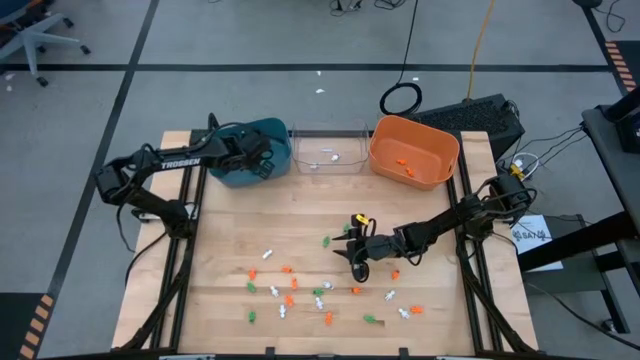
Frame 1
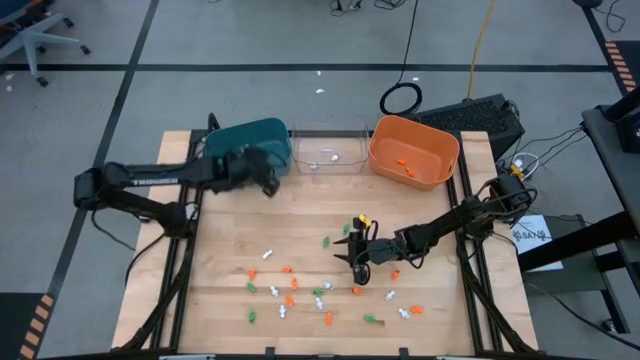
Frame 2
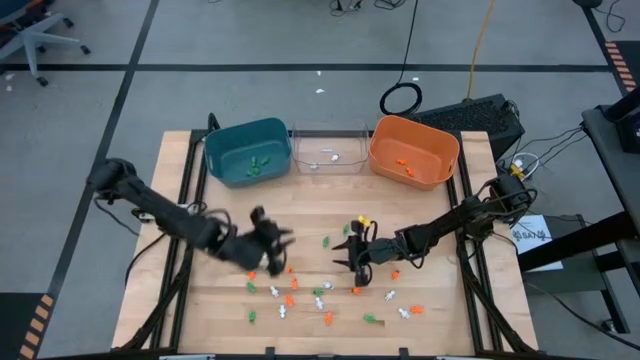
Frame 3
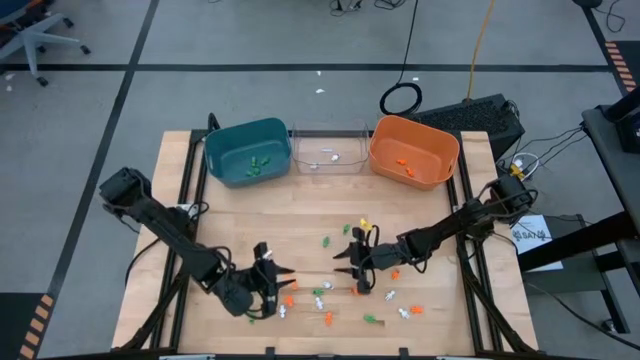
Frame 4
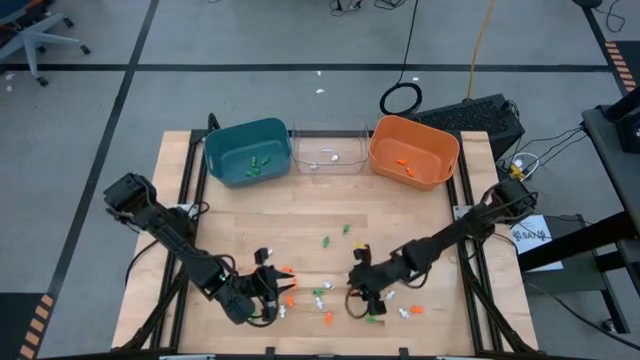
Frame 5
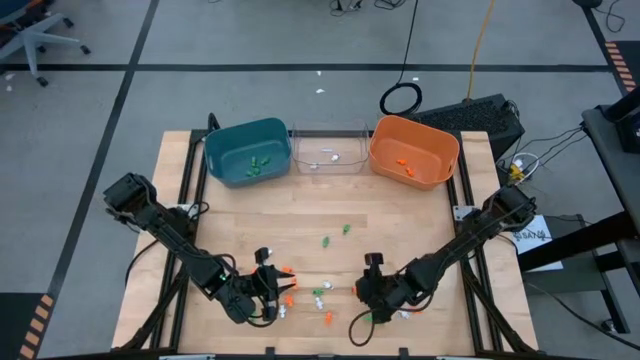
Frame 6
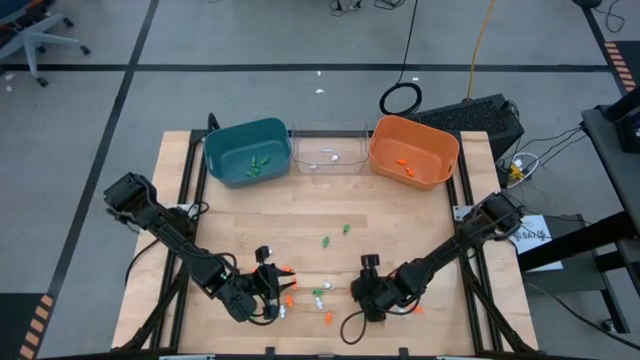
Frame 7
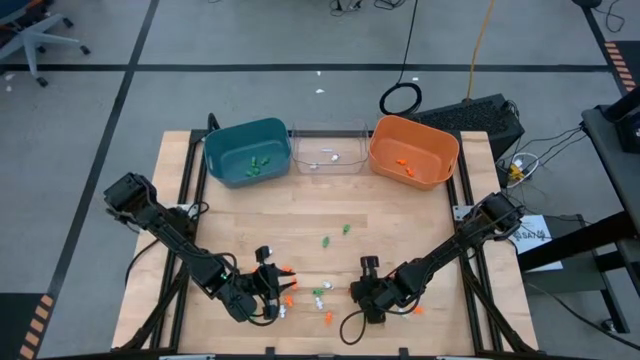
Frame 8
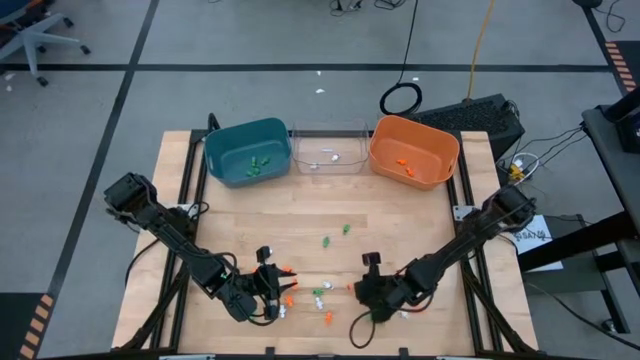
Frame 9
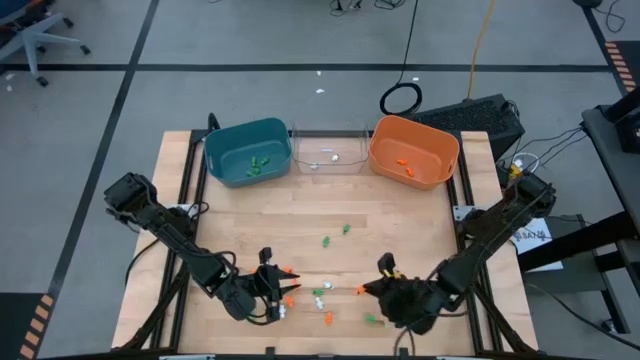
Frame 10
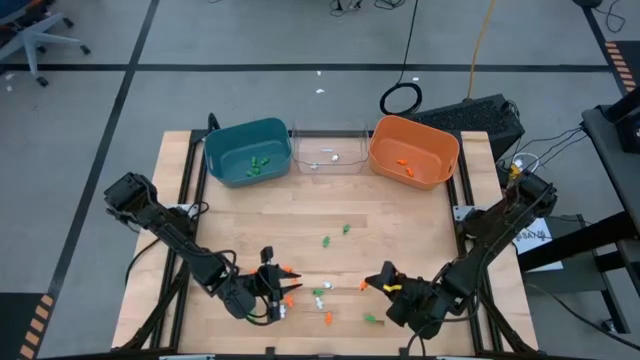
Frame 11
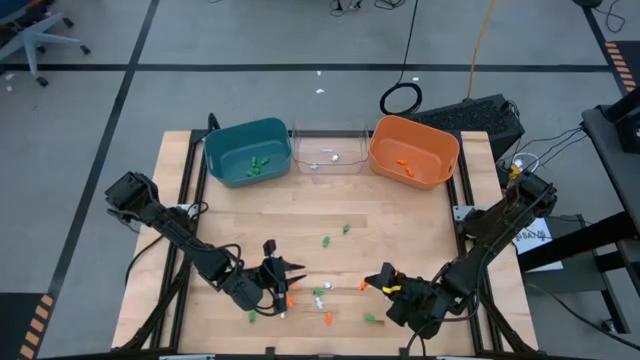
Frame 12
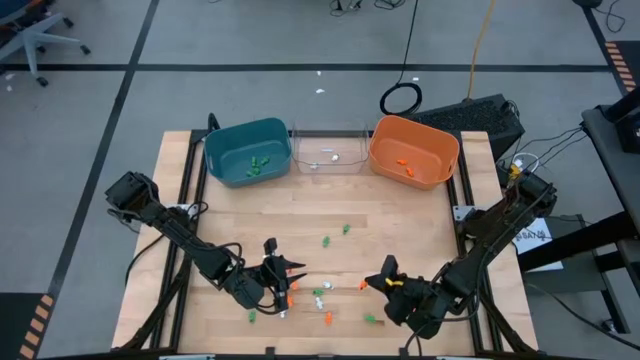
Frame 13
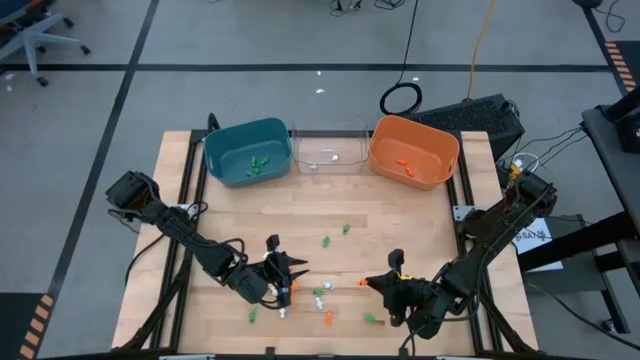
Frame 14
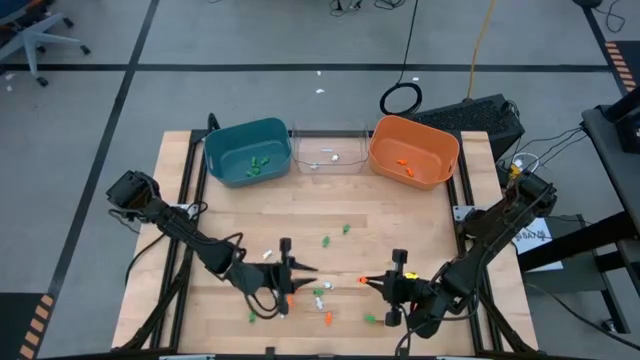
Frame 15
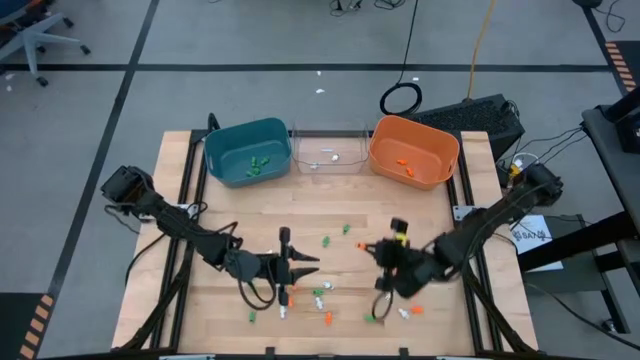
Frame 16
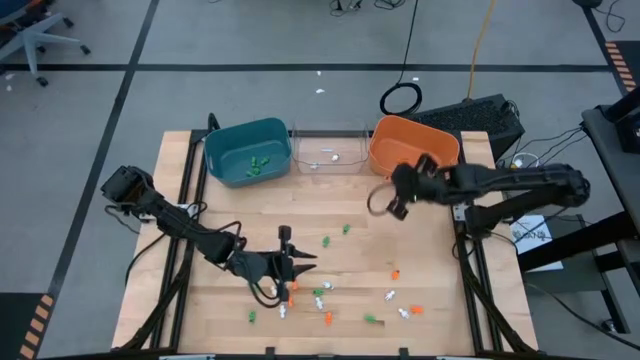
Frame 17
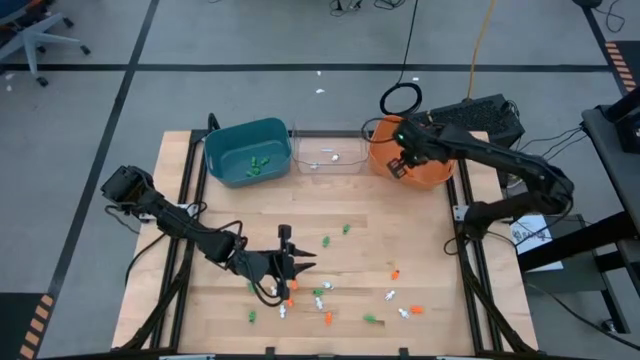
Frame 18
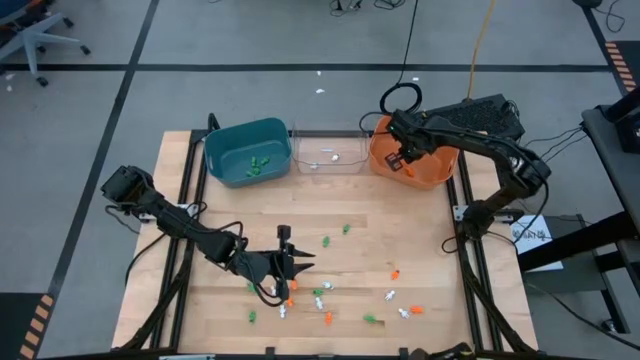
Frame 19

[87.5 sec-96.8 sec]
Task: Sort Halloween decoration
Put the orange skeleton toy into the orange bin

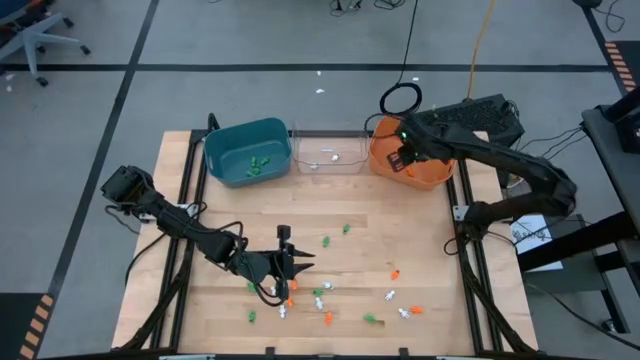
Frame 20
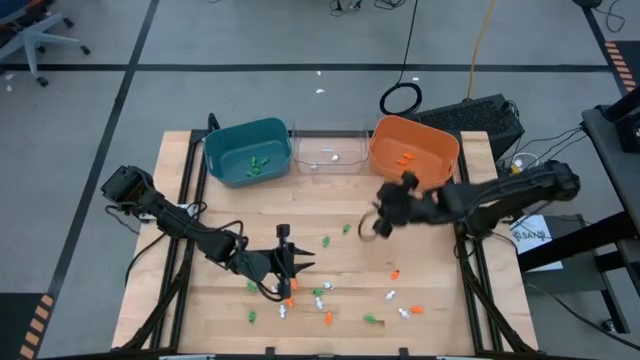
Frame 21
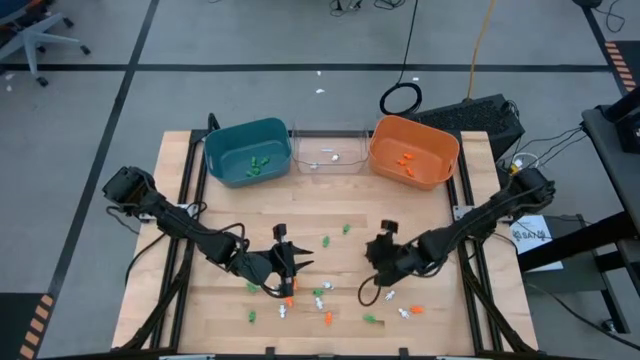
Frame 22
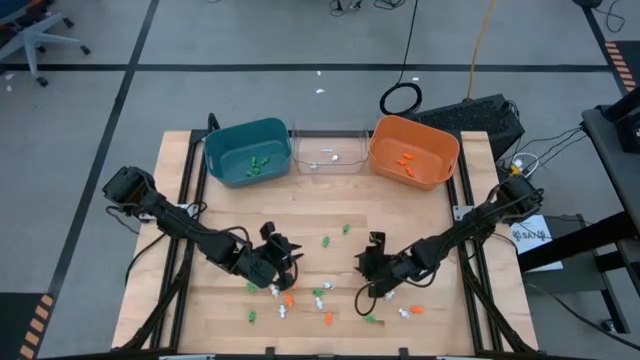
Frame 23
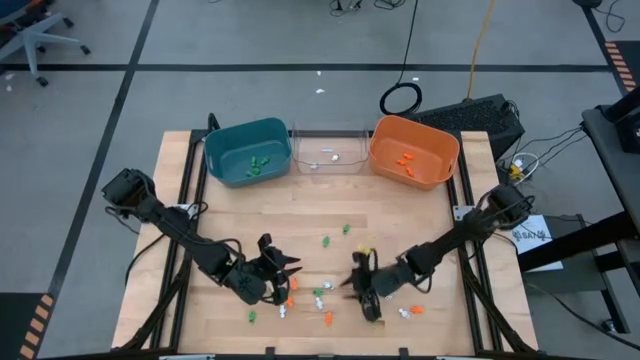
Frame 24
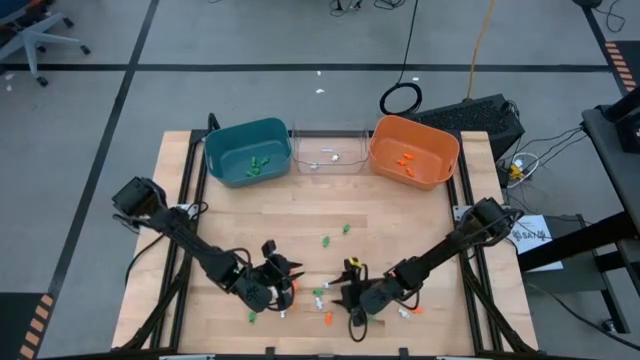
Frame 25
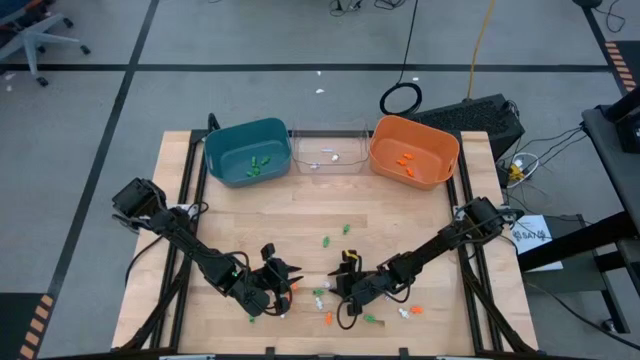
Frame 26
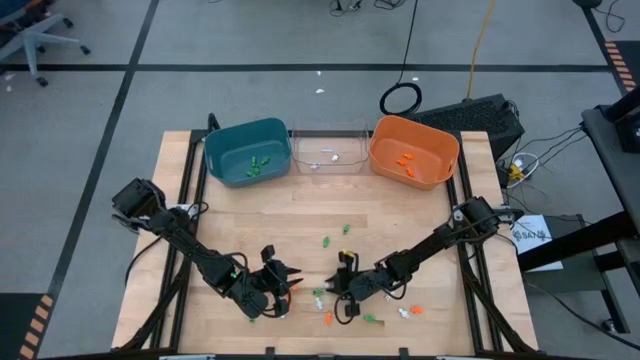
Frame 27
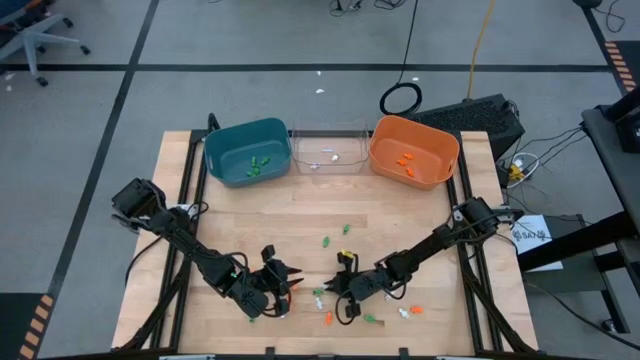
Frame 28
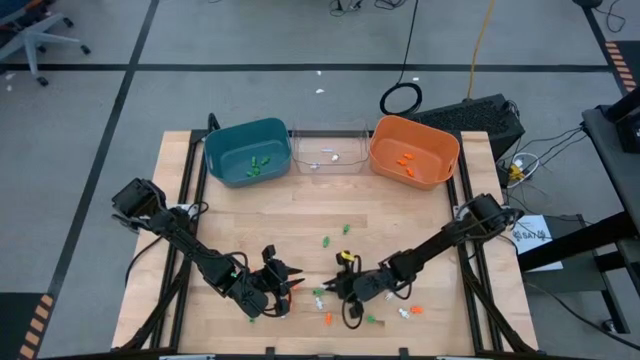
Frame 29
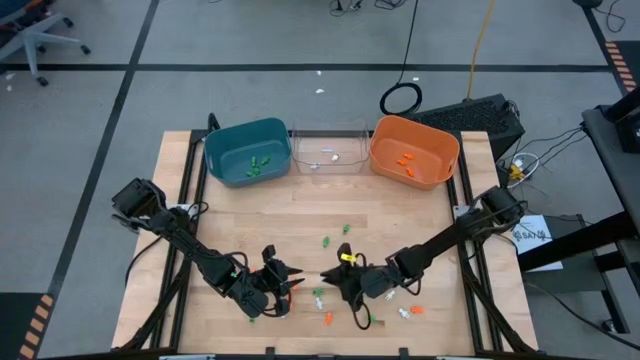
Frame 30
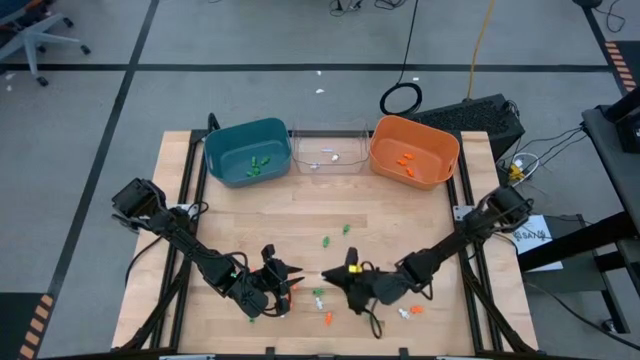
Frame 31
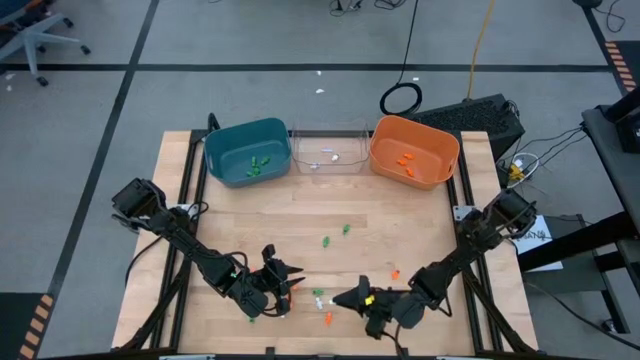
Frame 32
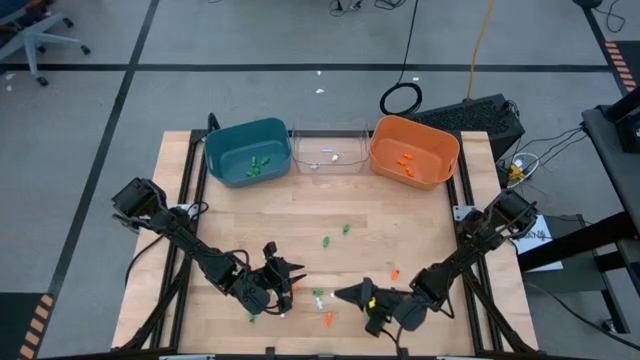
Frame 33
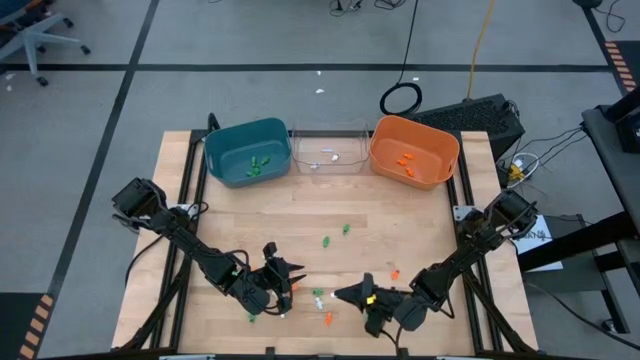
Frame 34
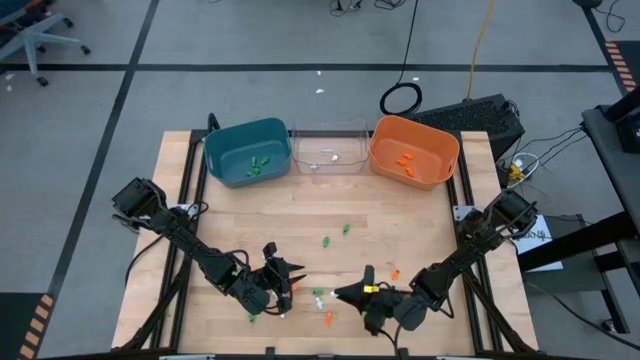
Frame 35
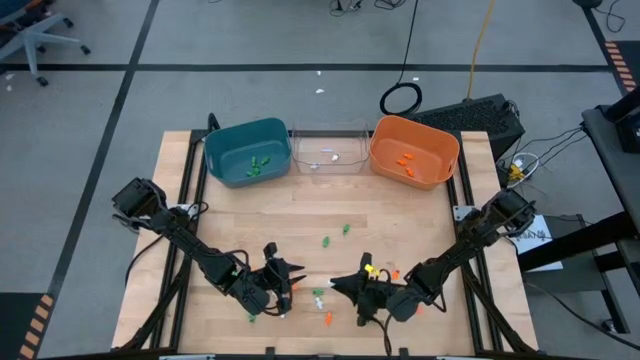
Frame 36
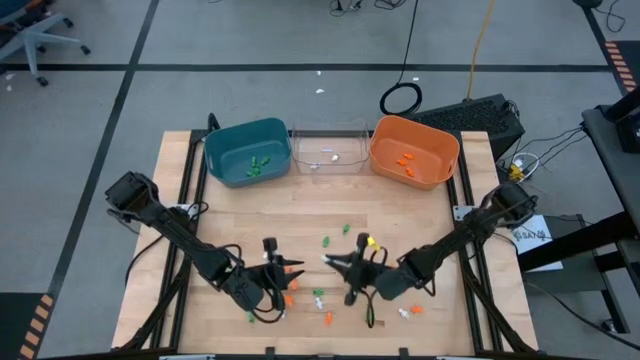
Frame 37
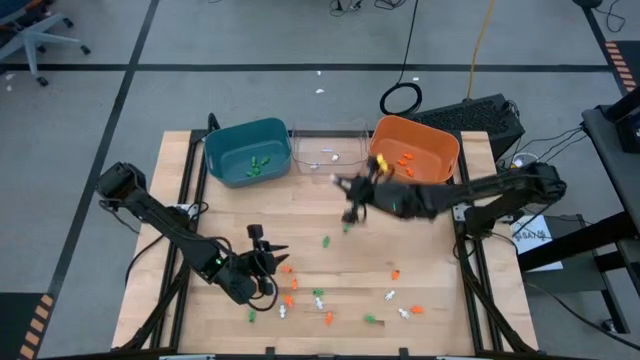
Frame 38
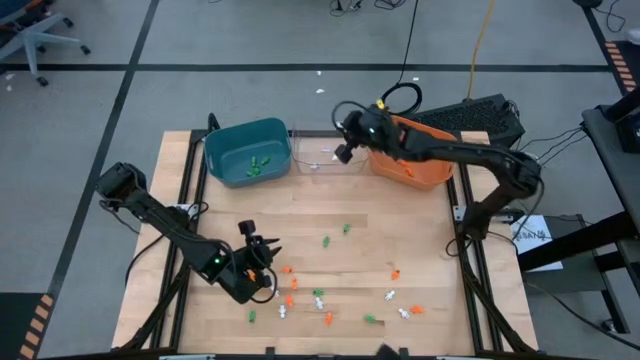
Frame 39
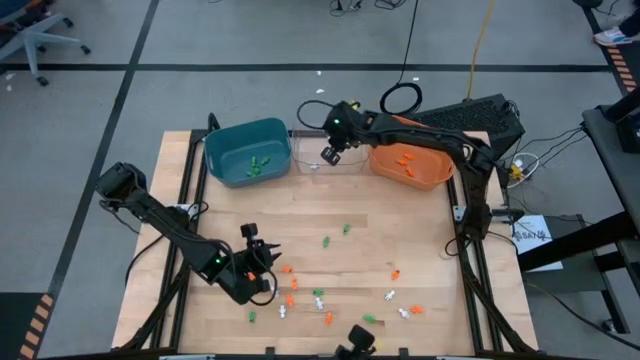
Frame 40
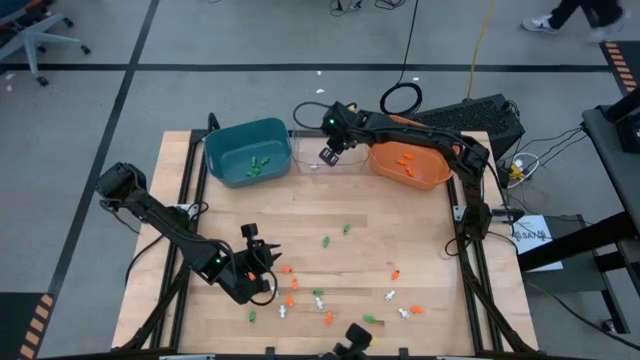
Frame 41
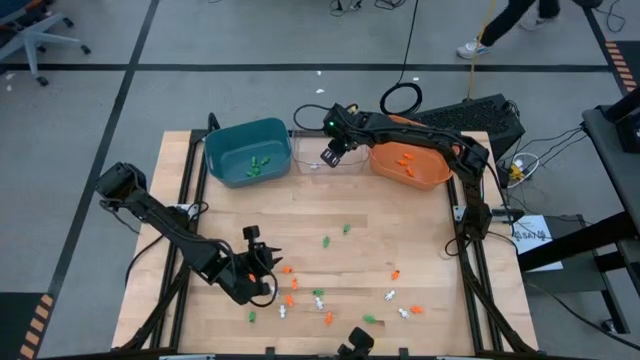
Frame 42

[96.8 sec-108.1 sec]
Put the white skeleton toy into the transparent bin
